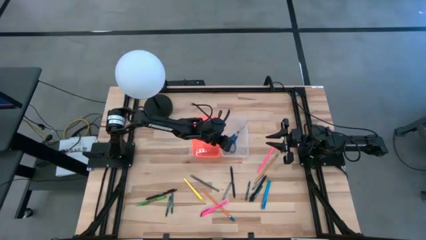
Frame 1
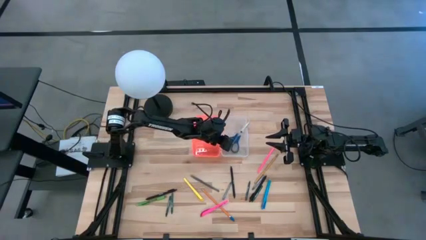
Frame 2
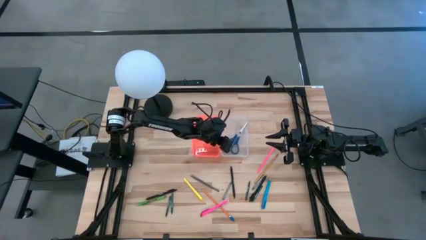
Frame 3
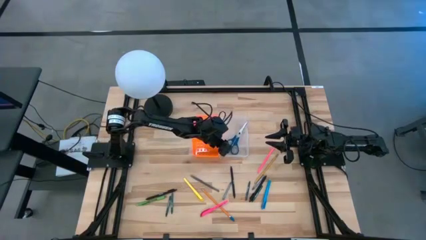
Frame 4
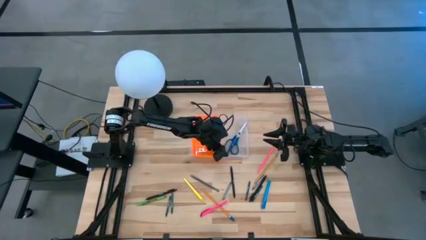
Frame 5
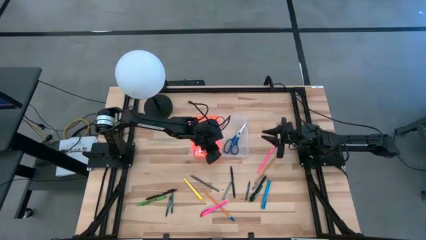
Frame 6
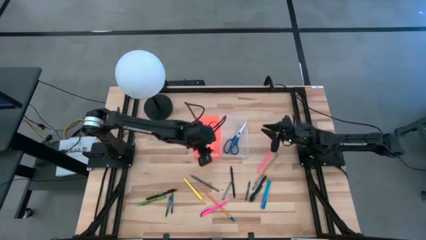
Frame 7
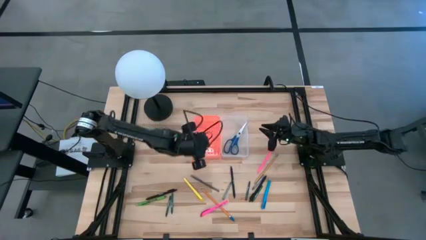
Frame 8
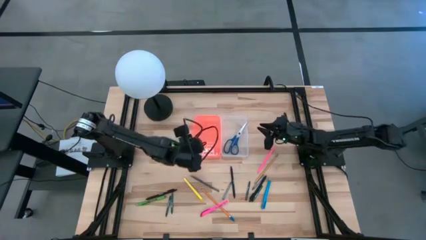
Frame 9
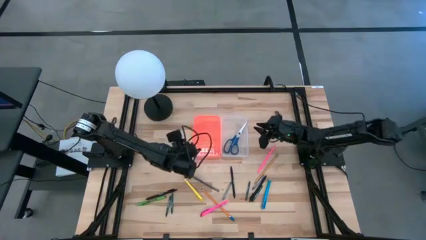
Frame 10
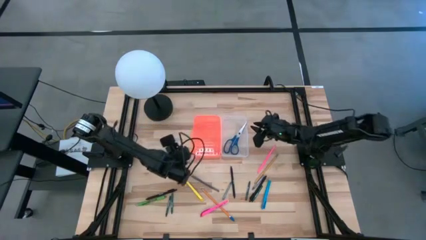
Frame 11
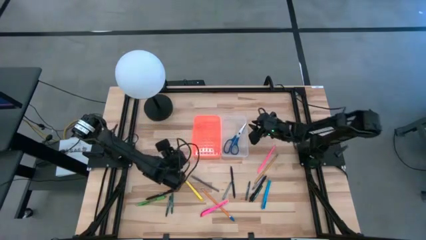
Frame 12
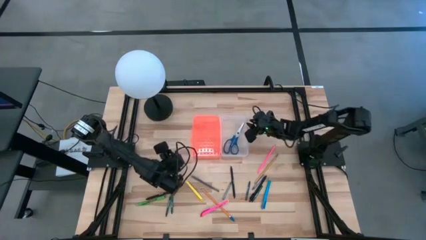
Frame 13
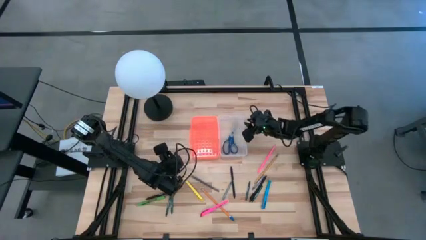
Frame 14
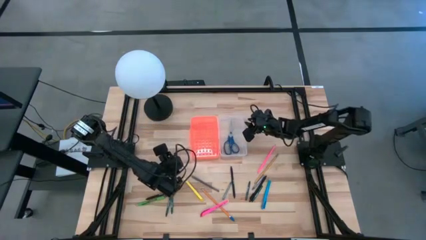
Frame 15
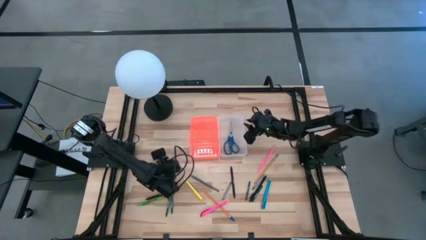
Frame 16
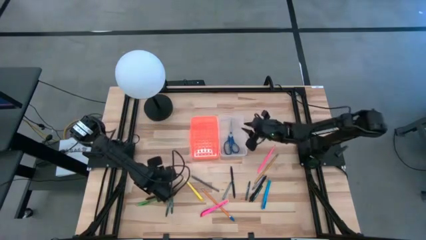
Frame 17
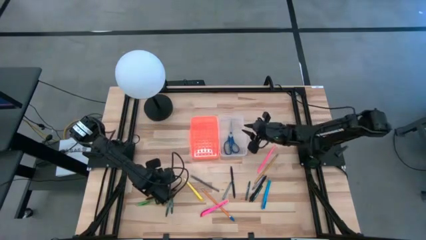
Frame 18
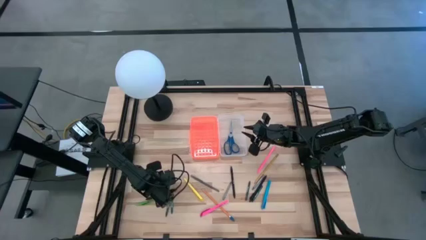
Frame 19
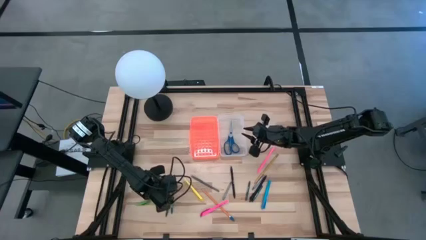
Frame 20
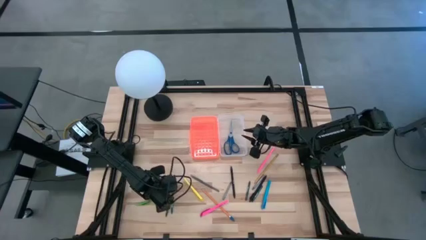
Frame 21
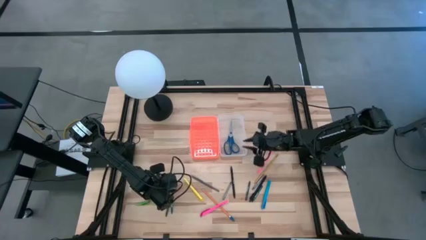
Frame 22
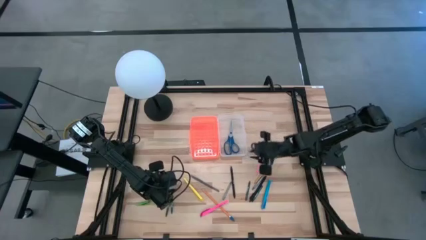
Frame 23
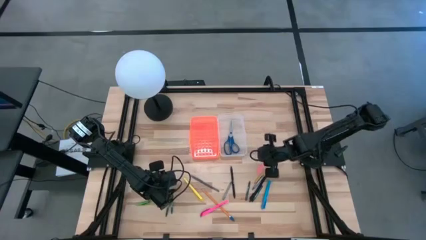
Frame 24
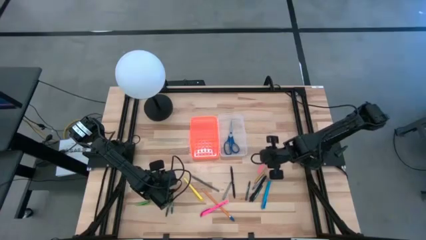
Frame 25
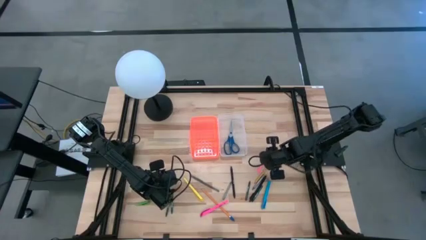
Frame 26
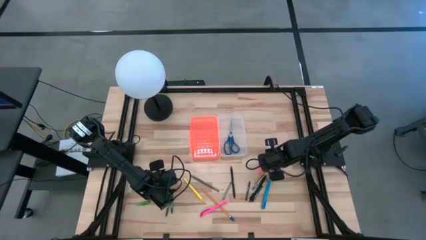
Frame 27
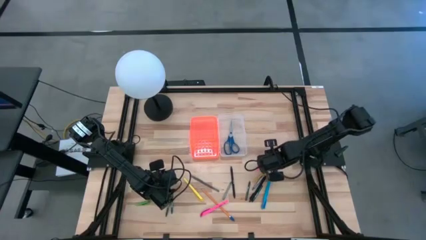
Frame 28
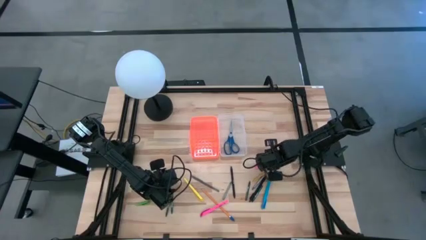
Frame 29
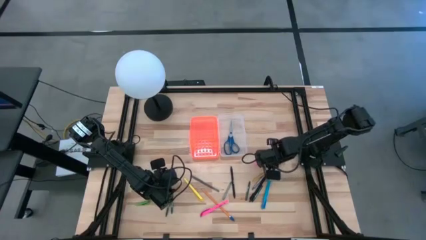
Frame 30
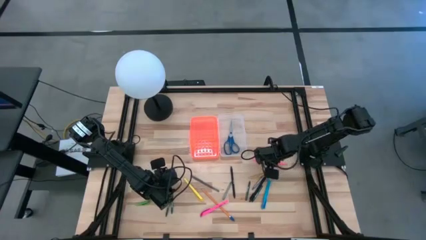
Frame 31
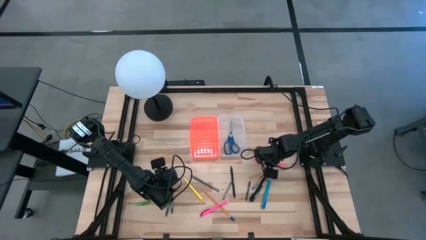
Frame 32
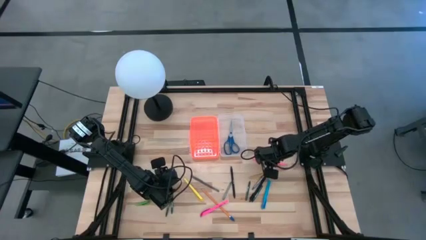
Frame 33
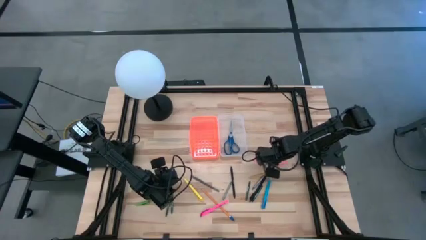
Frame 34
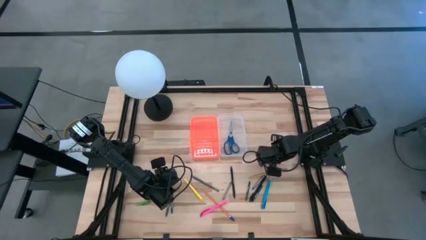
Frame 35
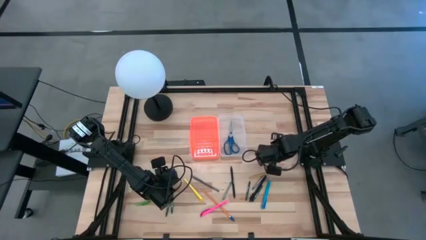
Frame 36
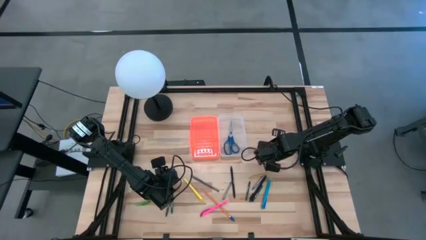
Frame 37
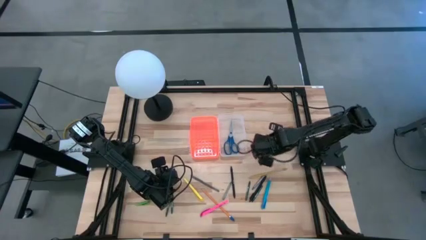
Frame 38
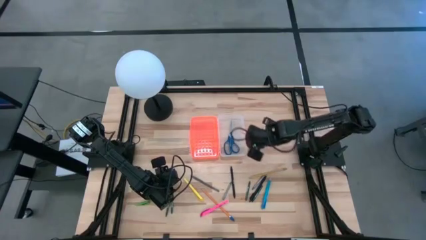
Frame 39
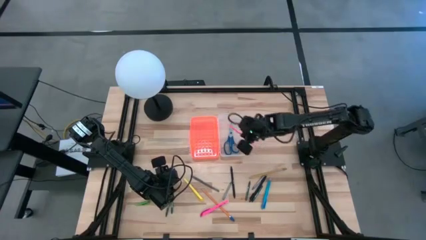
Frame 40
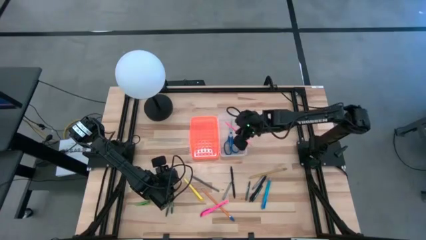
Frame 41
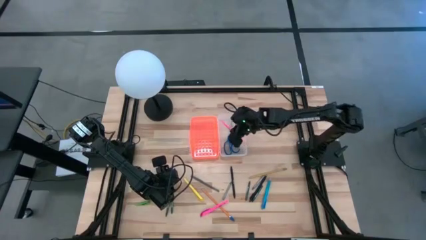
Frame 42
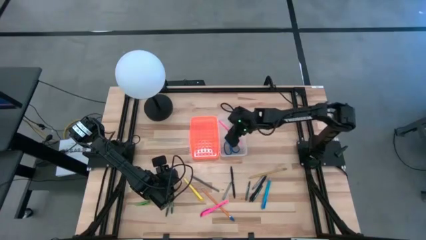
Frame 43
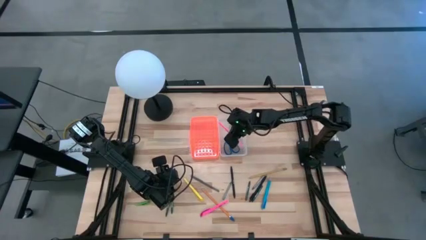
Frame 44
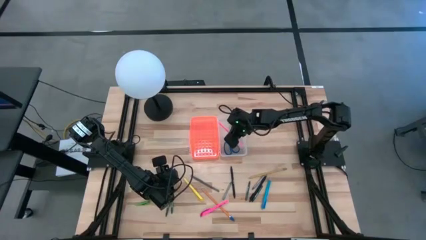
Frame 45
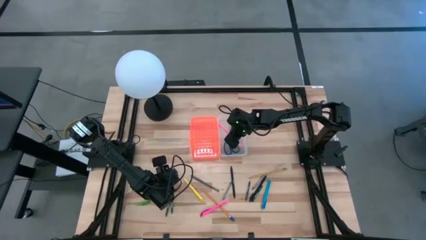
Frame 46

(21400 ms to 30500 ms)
Task: Pick & place school supplies into a supply box
Put the pink pencil into the orange supply box

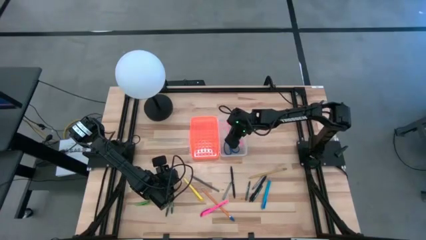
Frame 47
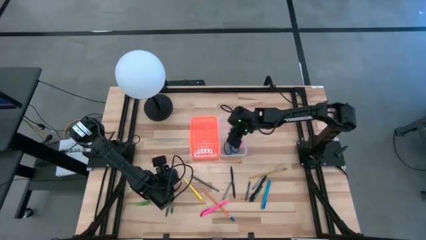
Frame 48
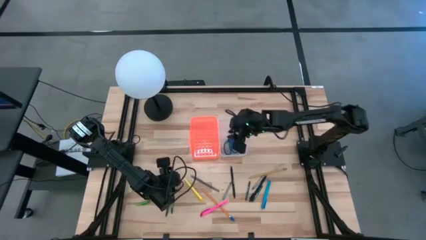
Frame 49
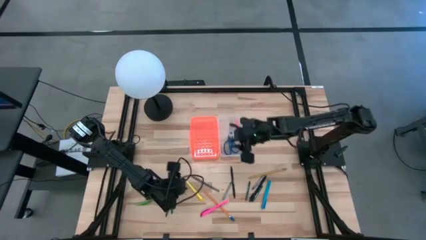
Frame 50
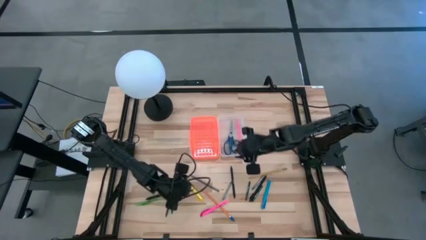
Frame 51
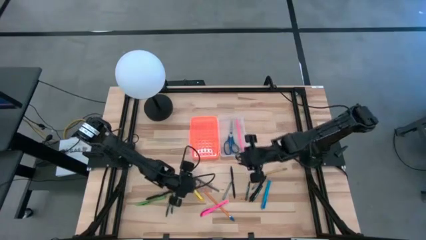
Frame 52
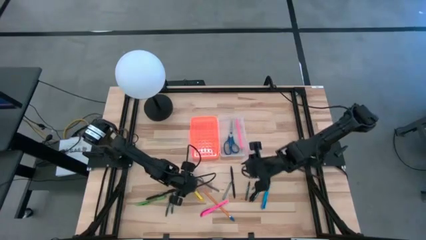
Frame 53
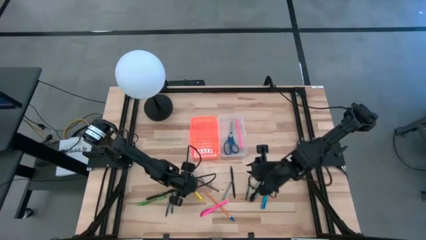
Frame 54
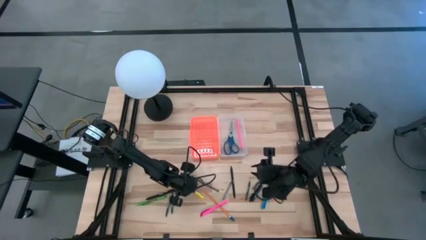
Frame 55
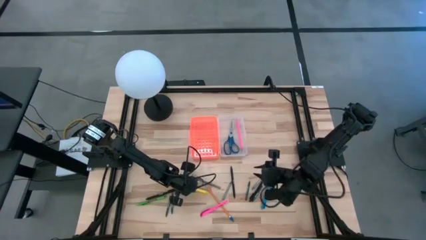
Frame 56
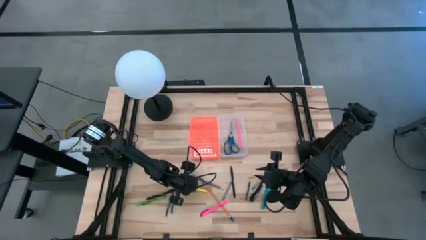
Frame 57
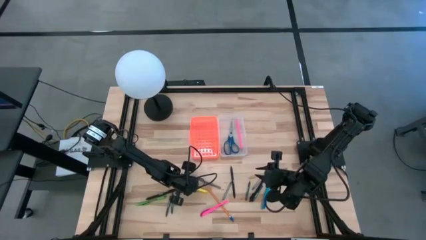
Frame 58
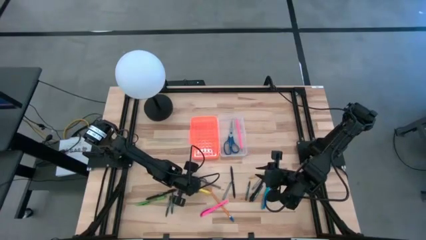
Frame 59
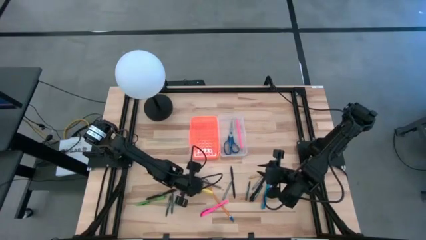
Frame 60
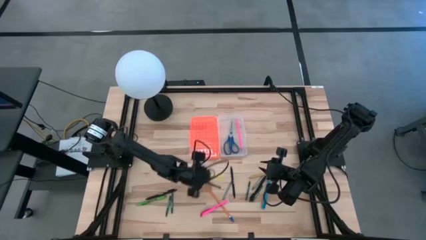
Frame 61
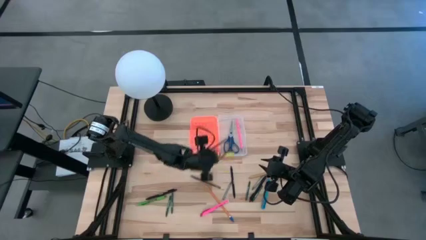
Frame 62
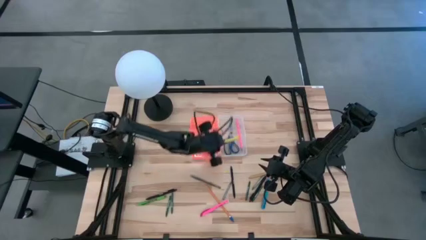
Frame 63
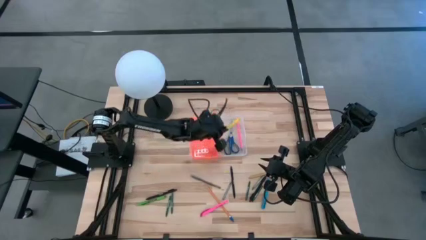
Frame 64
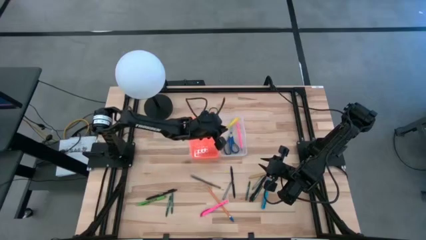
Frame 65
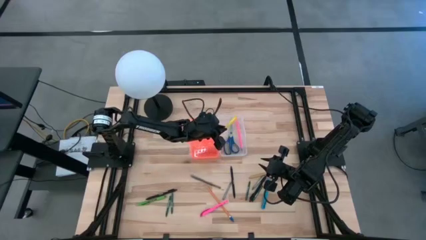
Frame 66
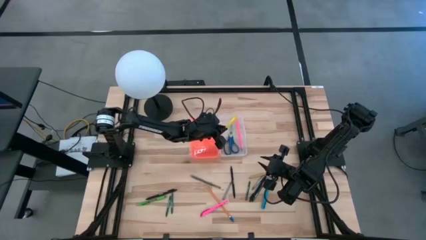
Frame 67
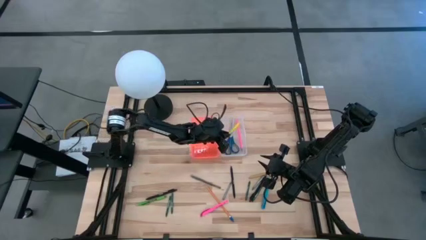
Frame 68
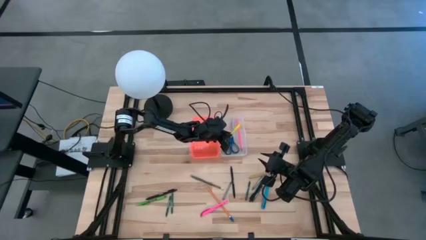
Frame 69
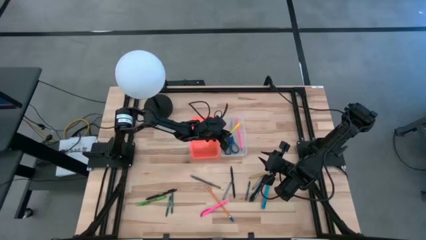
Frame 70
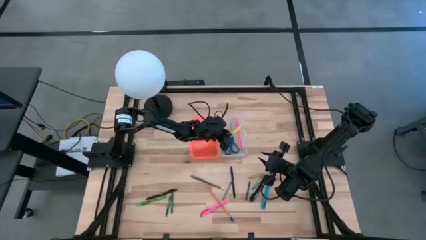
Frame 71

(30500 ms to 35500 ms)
Put the yellow pen into the orange supply box

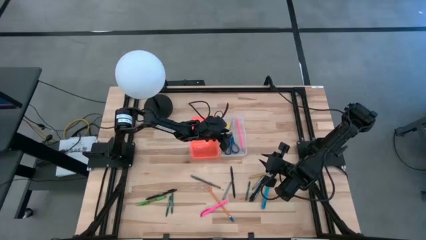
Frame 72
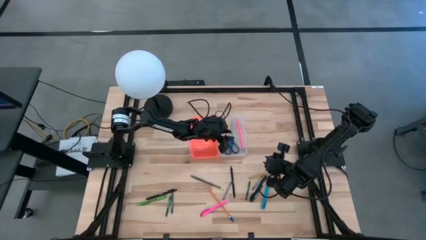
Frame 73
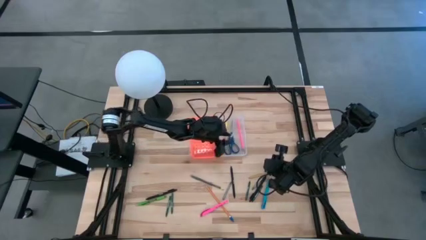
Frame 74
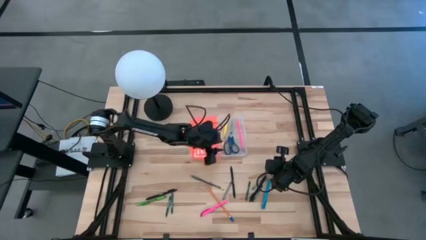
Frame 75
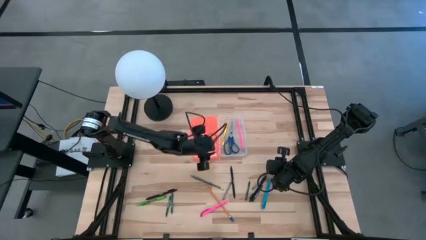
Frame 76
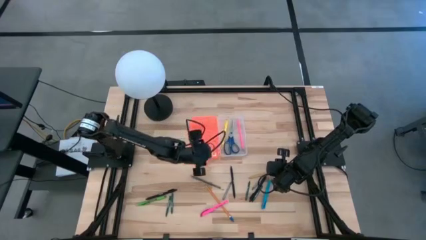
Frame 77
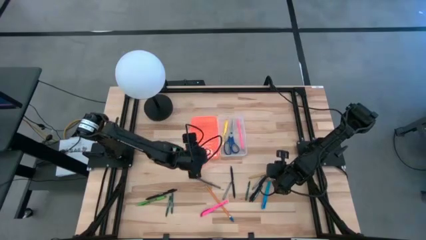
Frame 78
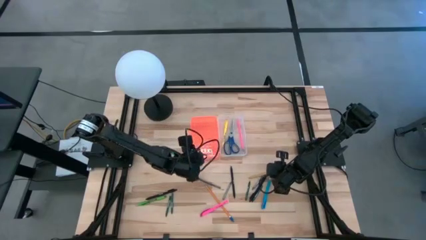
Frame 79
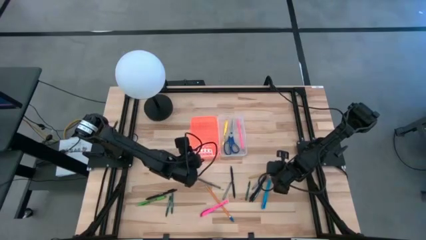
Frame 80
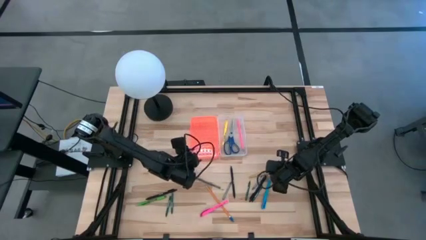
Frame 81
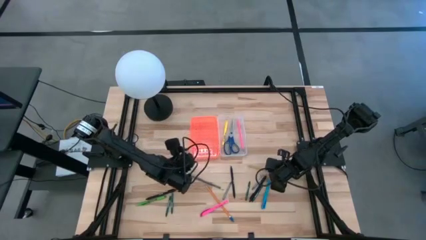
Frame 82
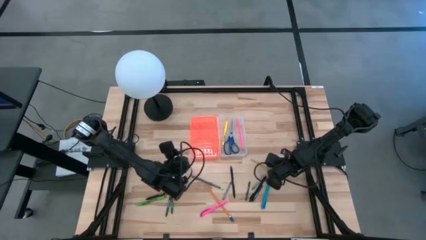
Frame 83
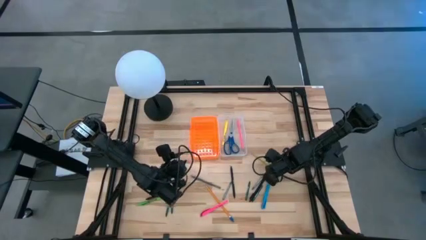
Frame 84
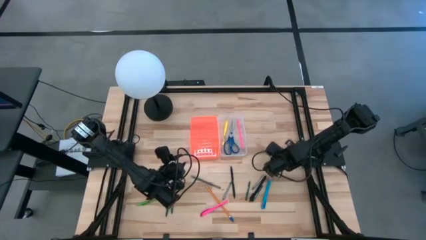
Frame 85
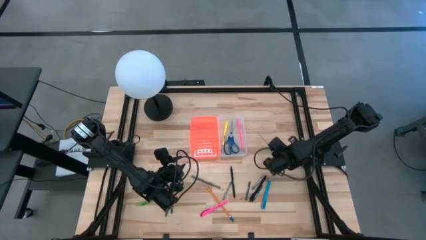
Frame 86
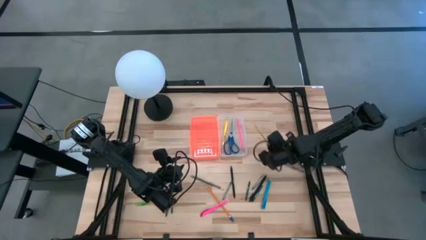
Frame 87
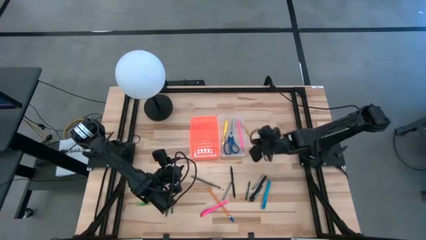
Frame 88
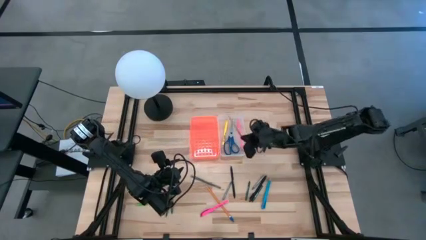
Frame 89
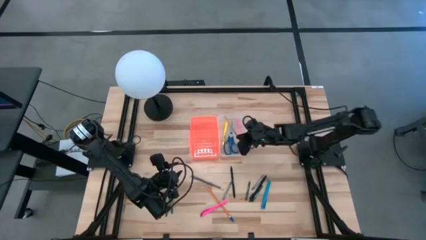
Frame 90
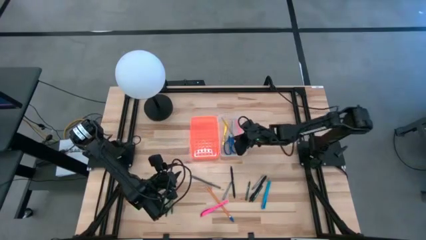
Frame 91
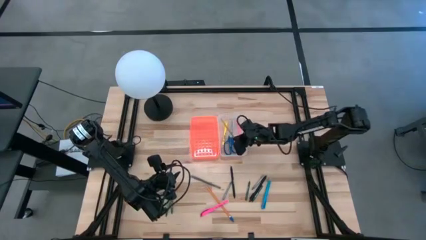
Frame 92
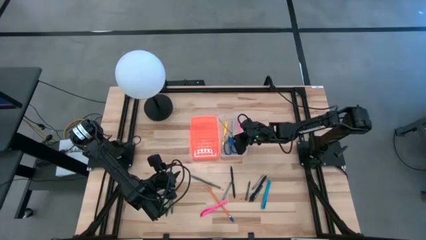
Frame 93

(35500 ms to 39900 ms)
Put the yellow pencil into the orange supply box
